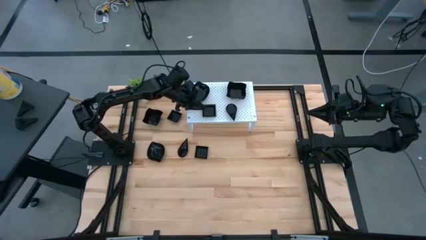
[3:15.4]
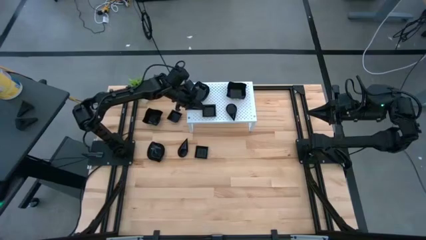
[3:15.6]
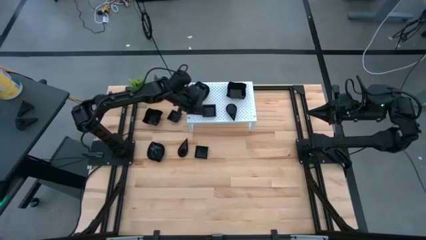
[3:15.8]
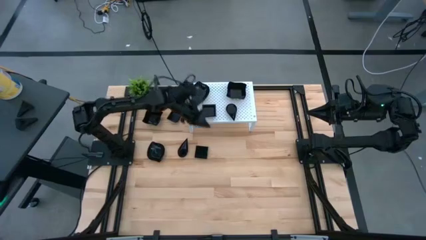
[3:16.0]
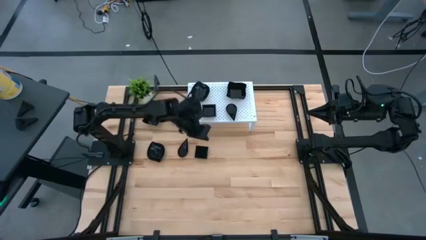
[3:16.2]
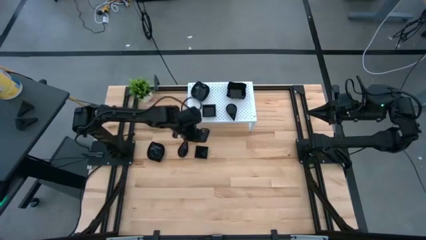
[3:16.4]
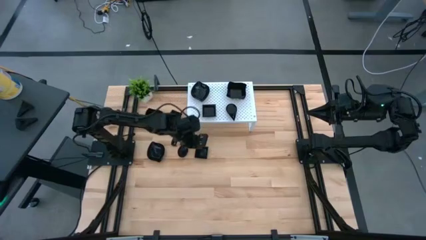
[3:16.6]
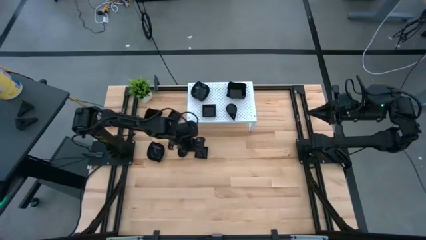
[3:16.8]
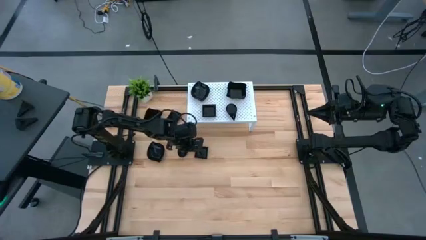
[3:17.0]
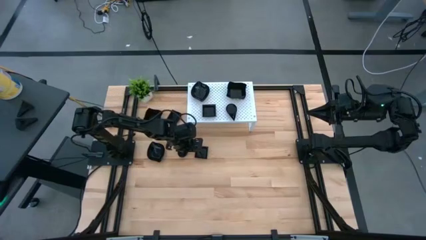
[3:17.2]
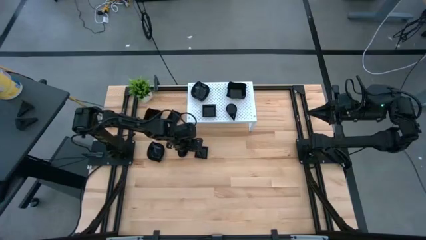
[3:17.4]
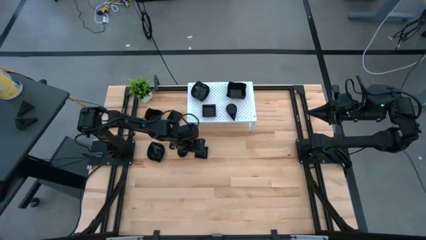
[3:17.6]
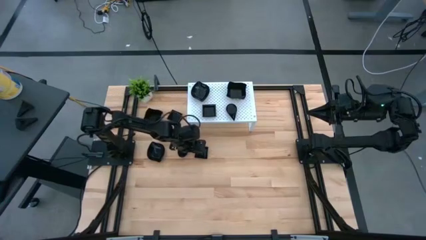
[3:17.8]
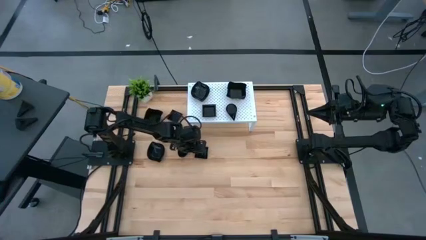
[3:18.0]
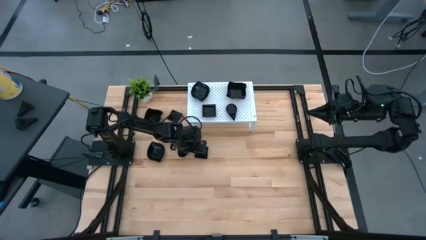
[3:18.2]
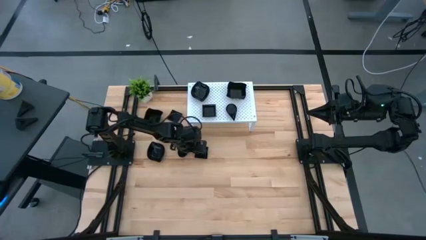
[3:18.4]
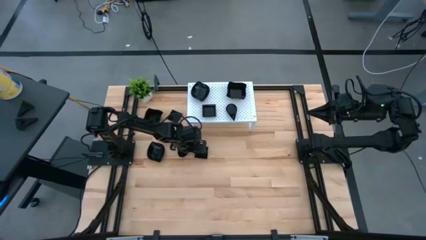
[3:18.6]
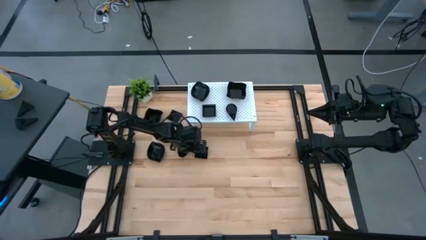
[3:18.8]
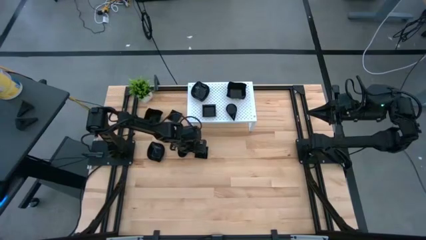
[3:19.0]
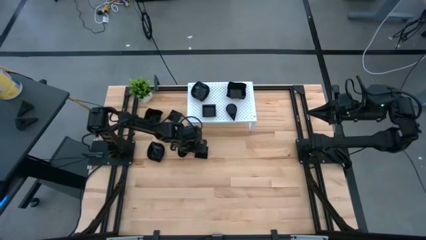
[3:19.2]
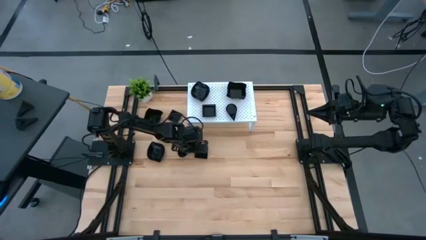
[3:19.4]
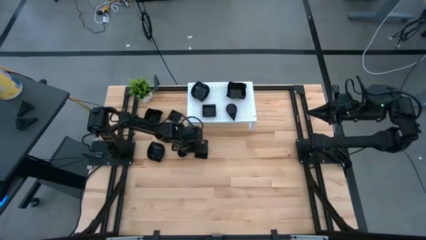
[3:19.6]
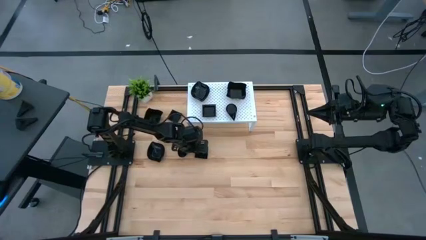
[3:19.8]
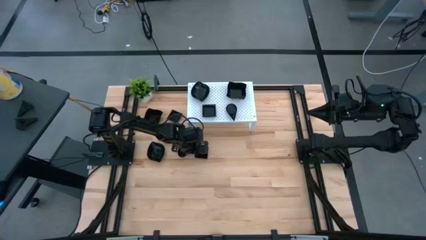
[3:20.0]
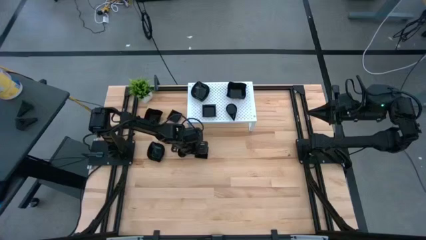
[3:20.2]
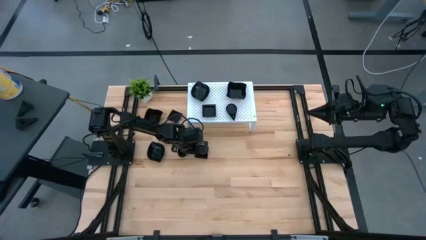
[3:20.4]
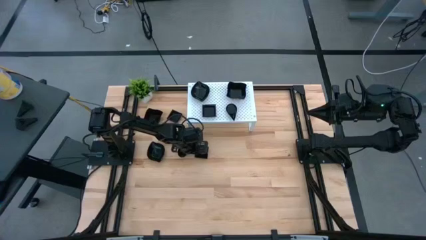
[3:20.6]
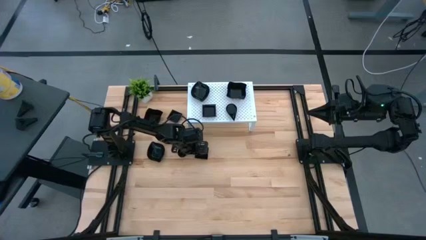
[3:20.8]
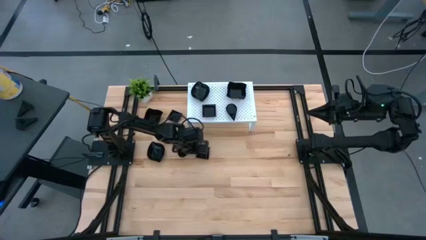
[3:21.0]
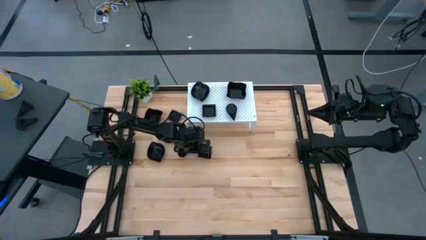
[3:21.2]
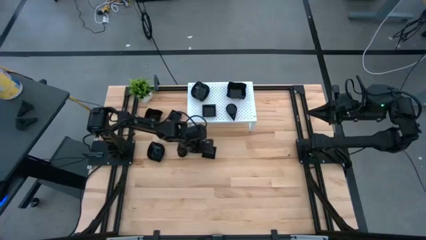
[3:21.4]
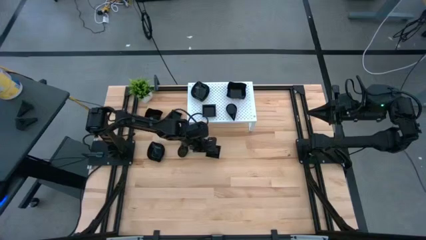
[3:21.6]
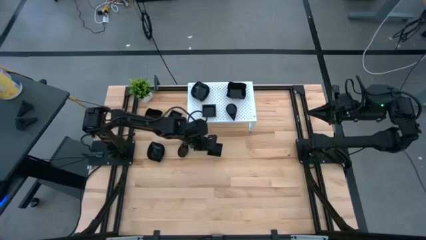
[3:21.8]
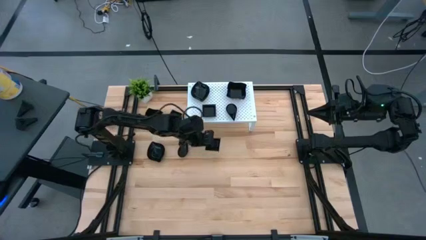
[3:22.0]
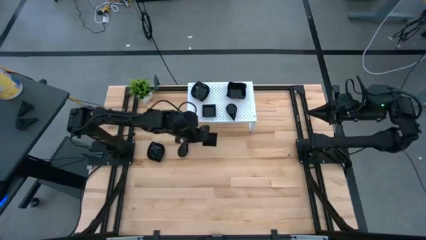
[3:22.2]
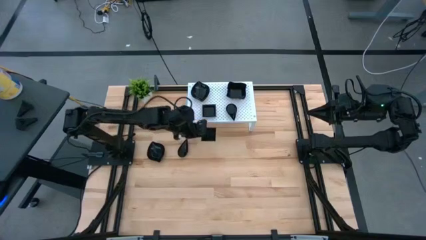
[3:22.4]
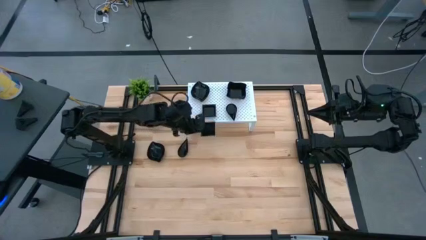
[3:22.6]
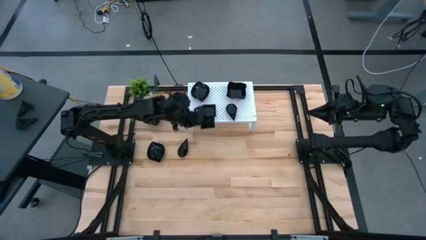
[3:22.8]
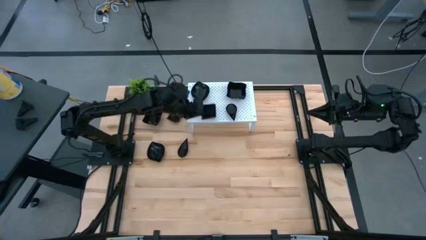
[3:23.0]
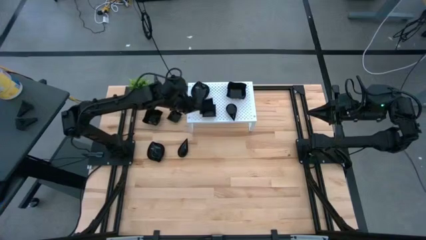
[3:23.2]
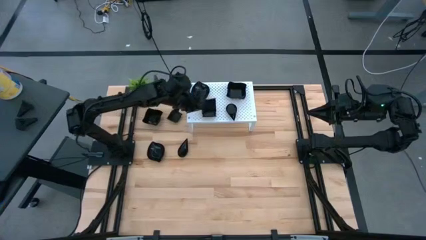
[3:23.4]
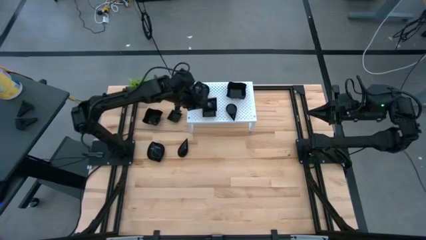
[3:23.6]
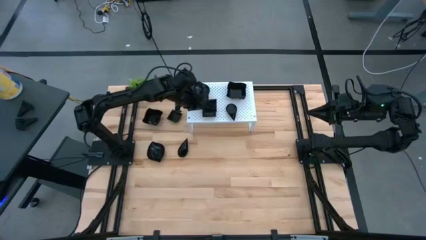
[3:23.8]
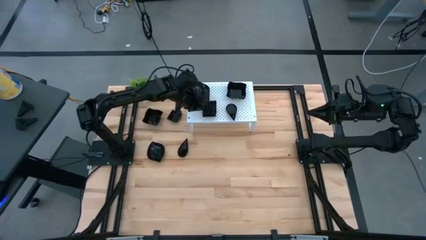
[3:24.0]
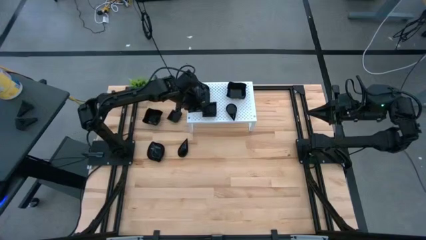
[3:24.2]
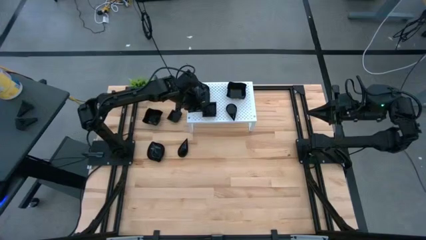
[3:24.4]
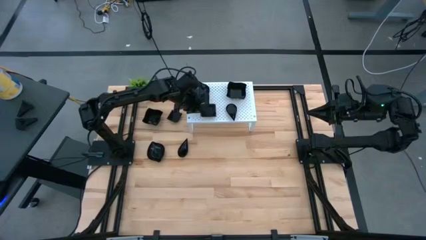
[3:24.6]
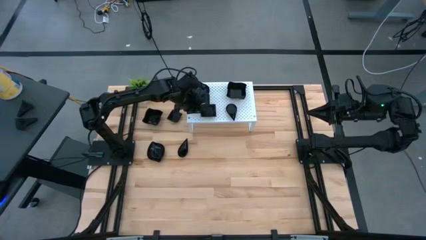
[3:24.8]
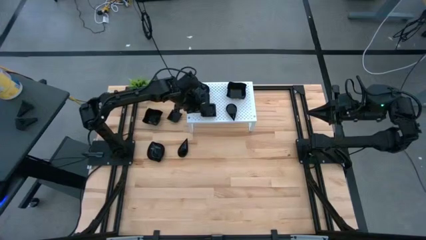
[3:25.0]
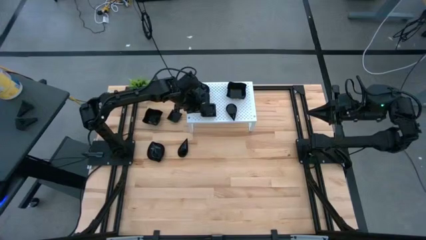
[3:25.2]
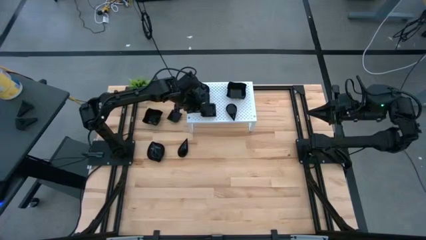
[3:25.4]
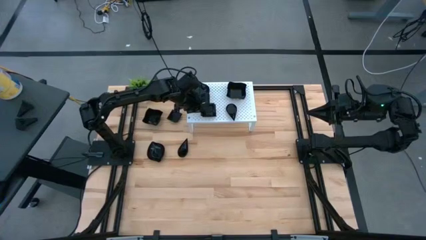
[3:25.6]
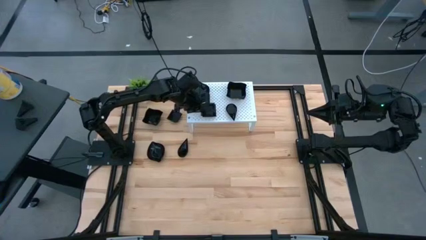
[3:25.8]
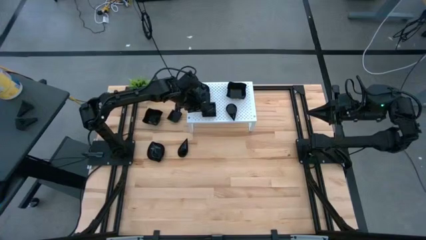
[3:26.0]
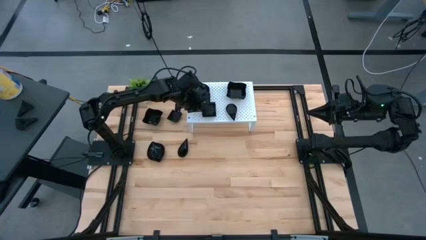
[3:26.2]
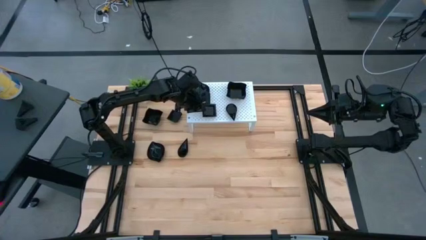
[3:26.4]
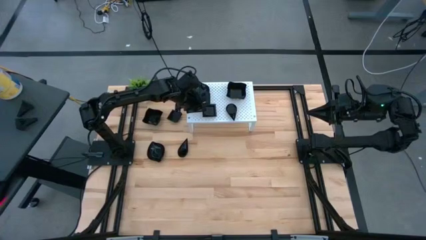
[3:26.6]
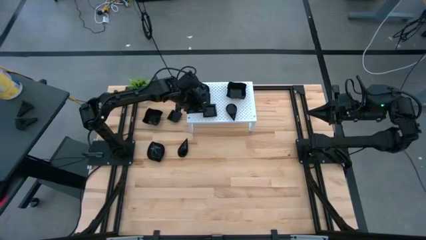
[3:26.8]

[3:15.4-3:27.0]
Task: Pick & Place Mini shaped plates
Stack the square plate on top of the square plate on the shelf
